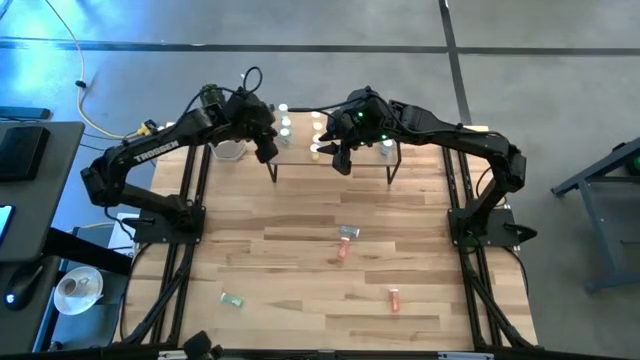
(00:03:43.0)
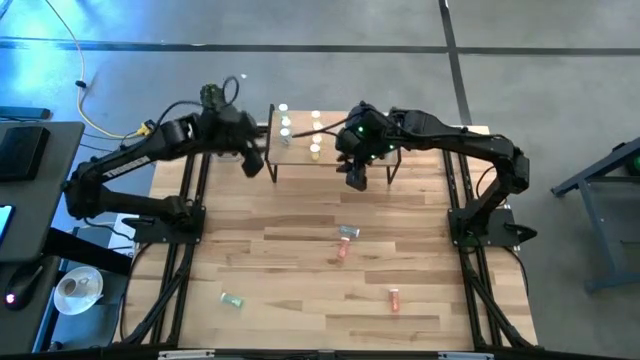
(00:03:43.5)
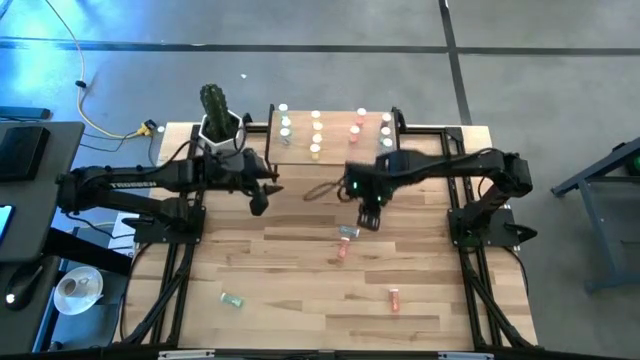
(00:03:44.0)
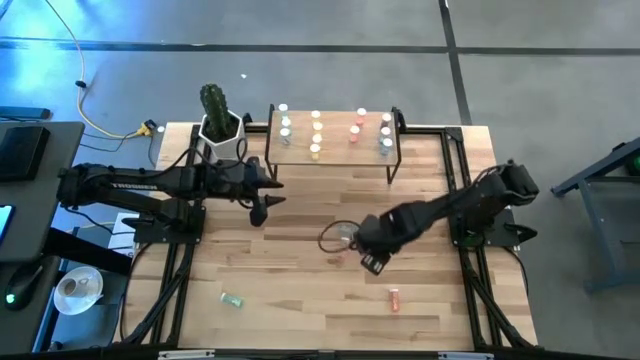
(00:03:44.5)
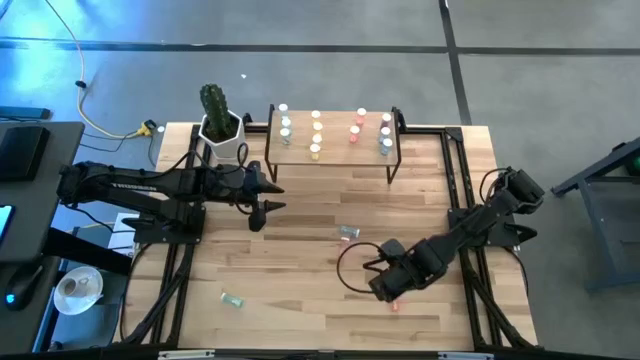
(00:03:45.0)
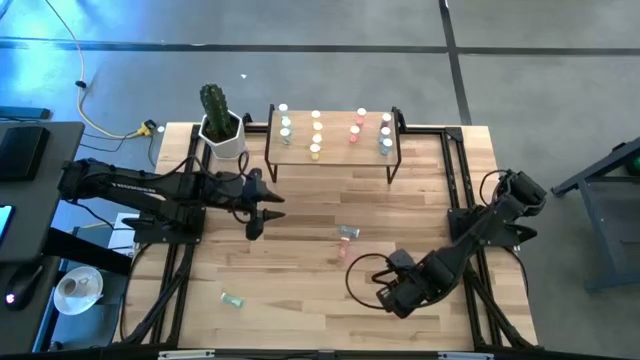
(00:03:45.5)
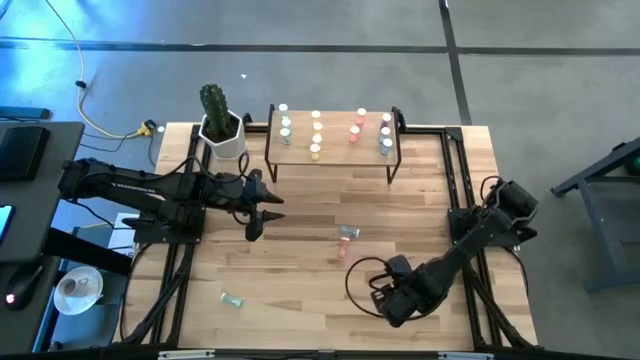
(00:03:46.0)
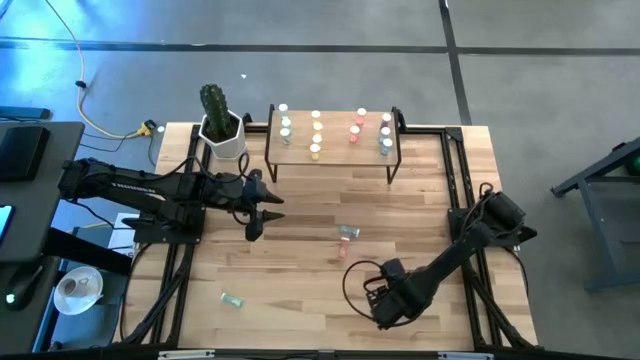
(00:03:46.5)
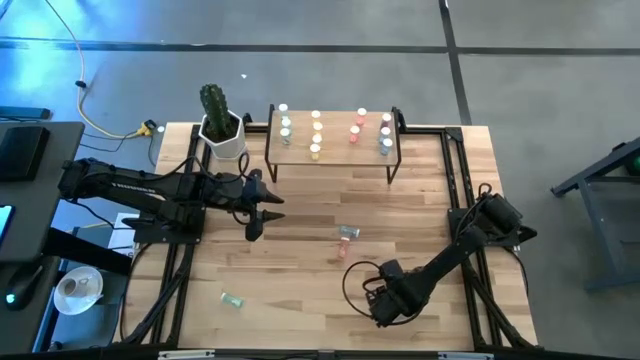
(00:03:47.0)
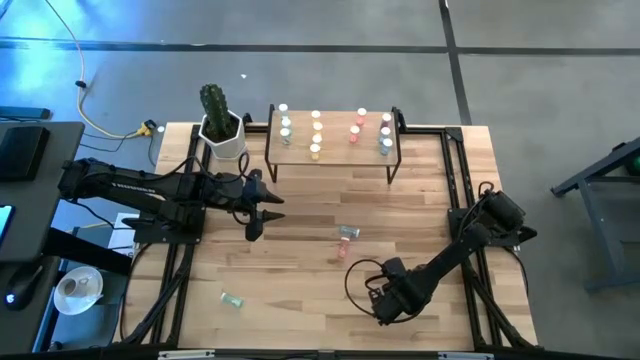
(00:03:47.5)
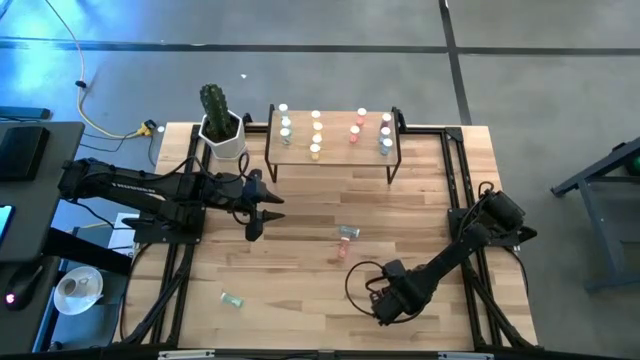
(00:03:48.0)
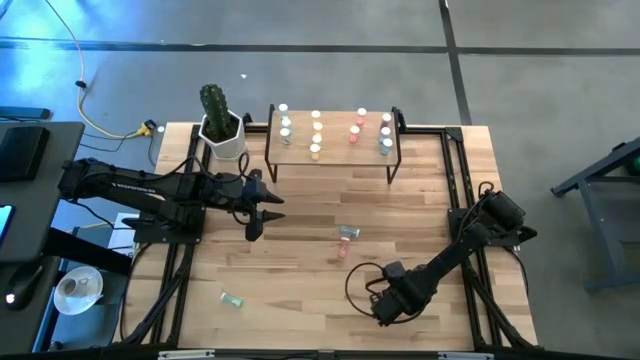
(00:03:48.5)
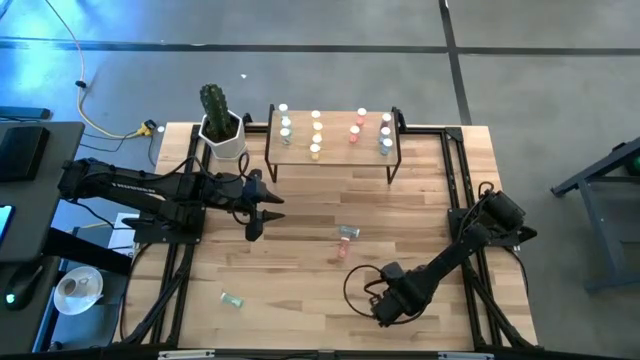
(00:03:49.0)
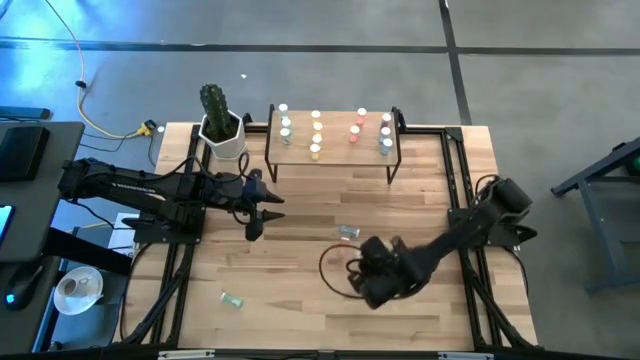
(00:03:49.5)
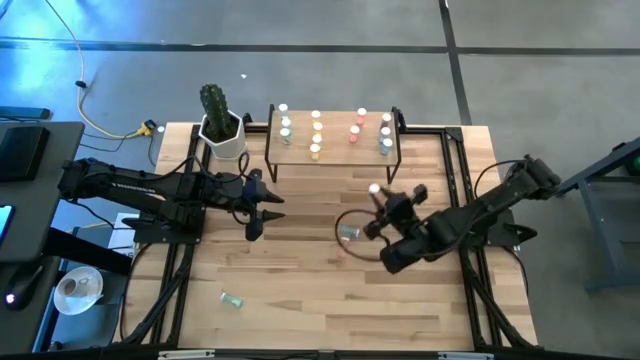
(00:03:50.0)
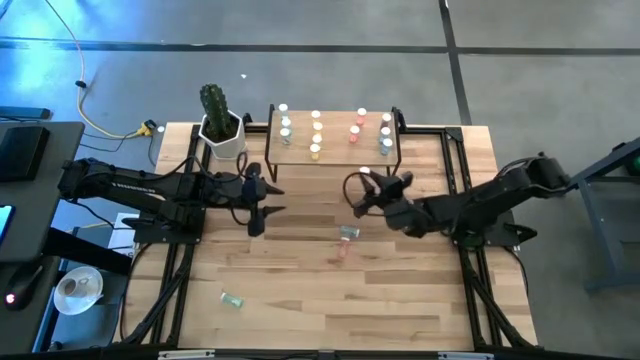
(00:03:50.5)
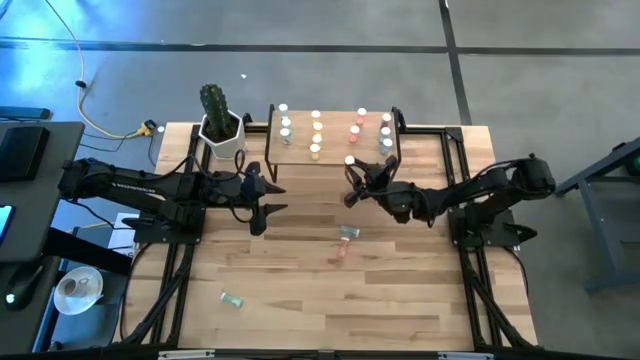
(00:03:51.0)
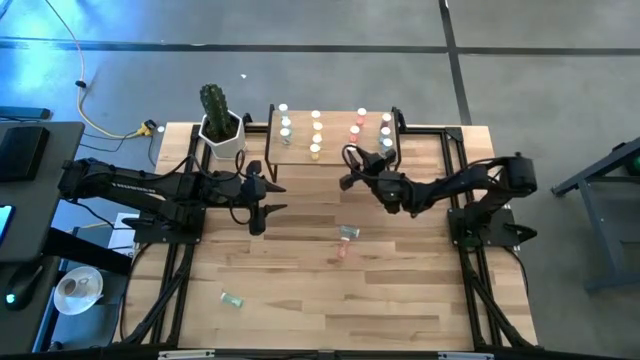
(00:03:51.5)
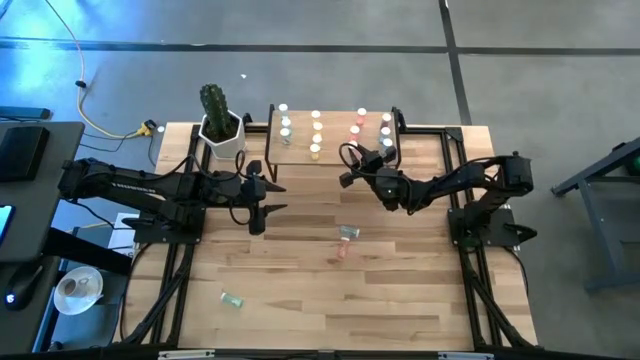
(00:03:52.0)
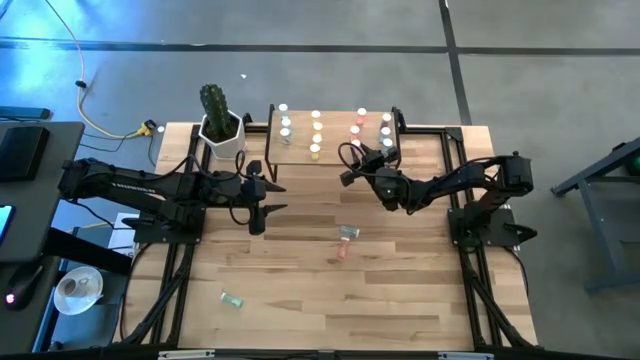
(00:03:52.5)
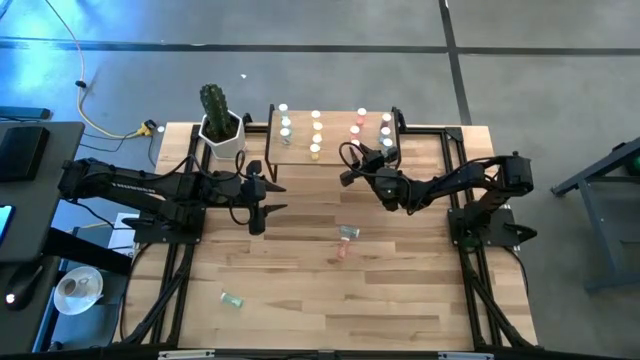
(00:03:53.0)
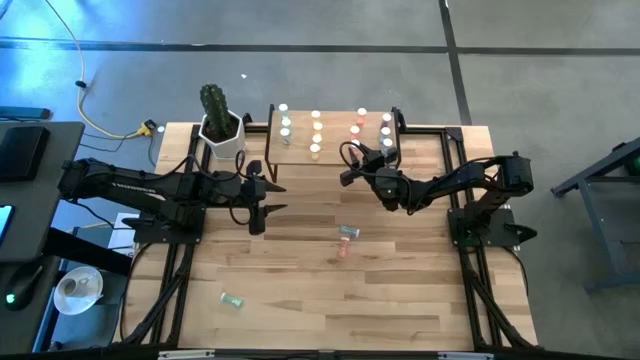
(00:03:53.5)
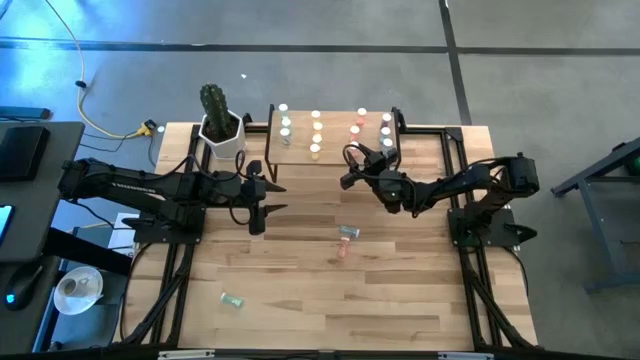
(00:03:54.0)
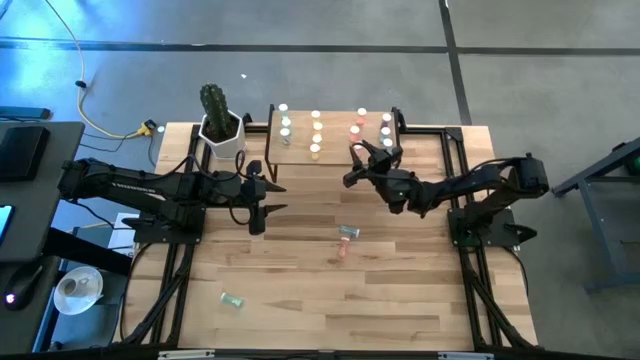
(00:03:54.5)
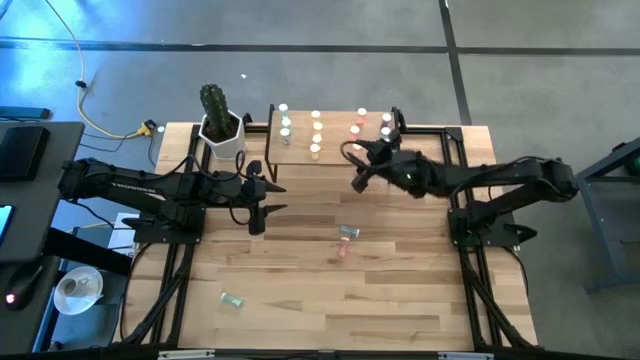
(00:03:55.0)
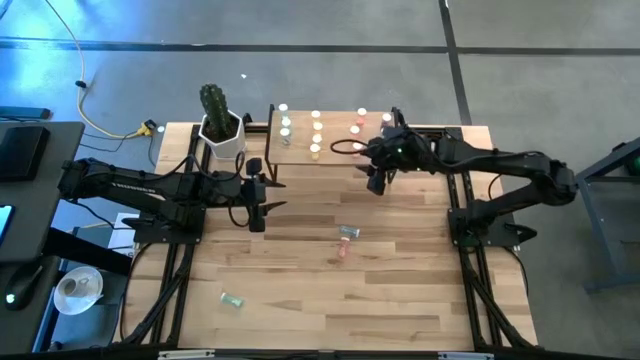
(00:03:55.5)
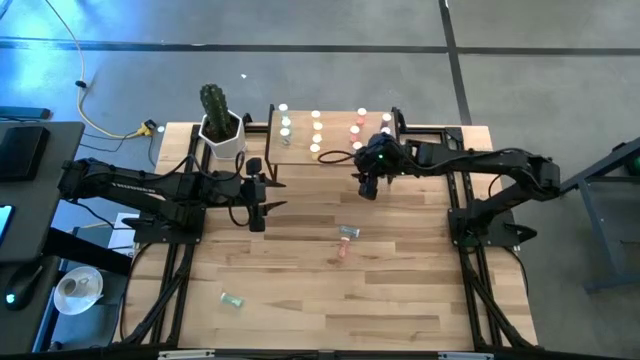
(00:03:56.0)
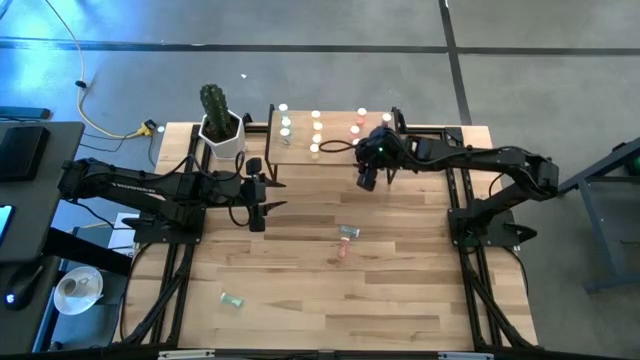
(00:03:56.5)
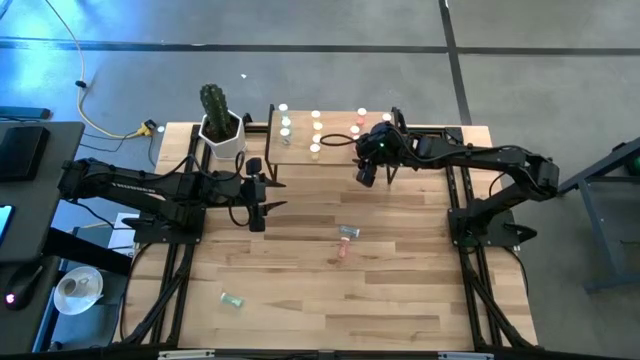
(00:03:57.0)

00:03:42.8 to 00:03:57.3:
Task: Pick and place medicine bottles onto shelf by color
Put the orange pill bottle on the shelf

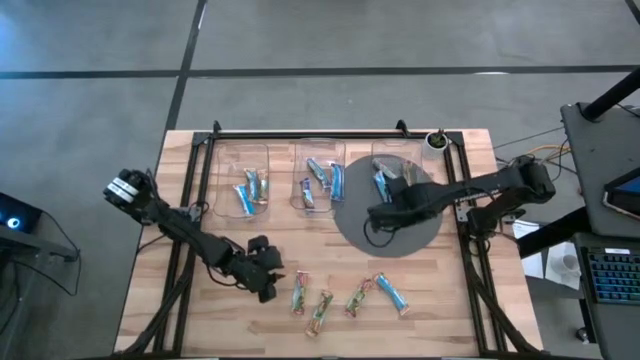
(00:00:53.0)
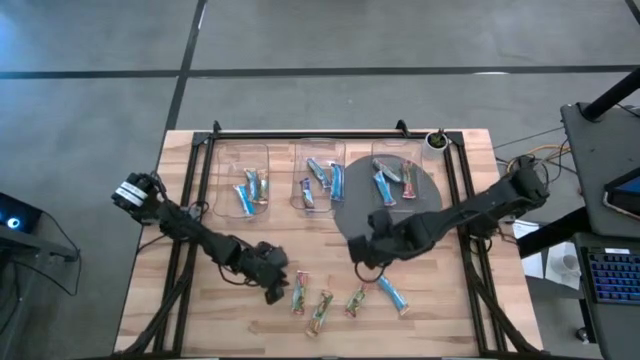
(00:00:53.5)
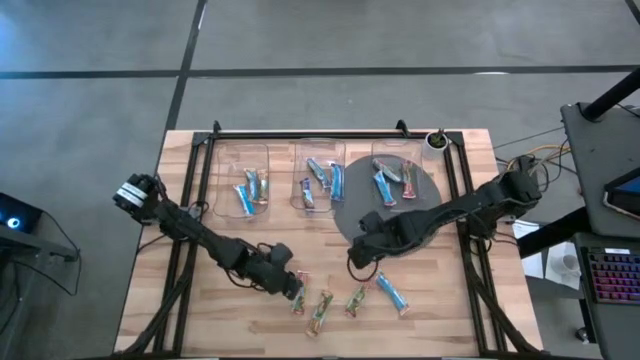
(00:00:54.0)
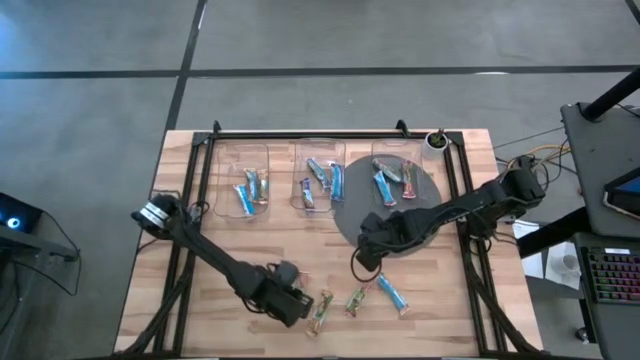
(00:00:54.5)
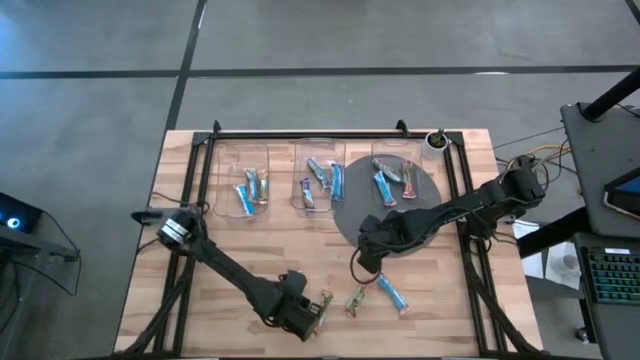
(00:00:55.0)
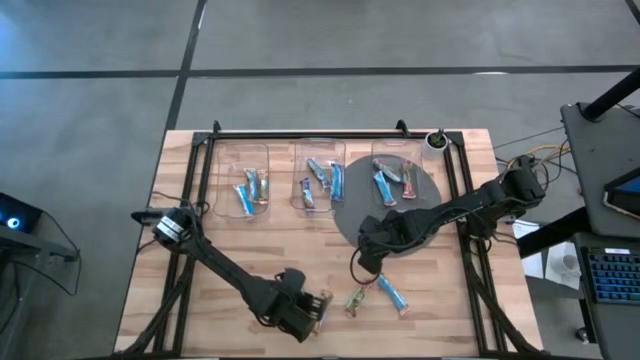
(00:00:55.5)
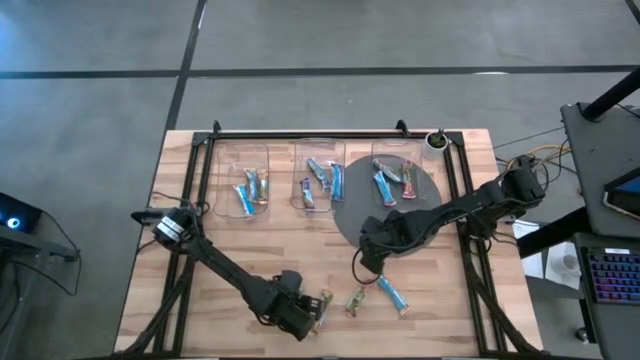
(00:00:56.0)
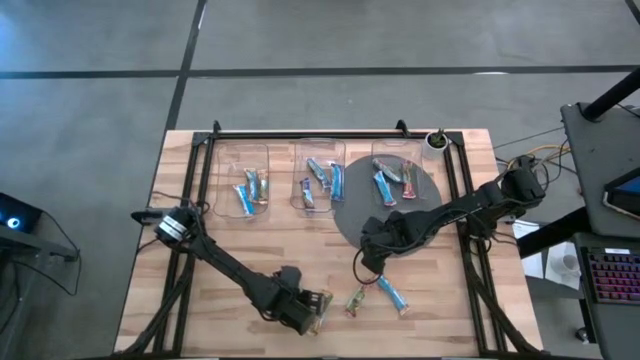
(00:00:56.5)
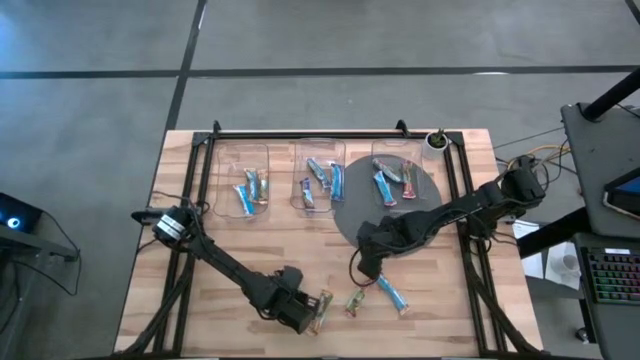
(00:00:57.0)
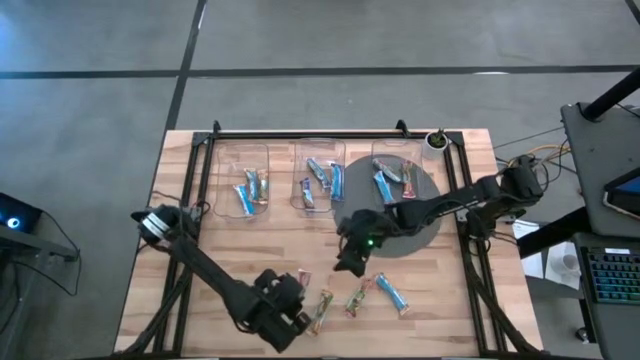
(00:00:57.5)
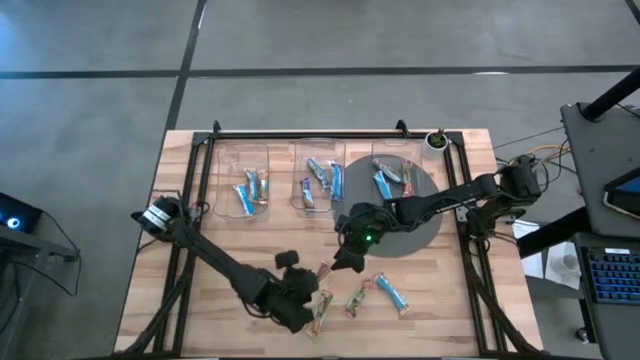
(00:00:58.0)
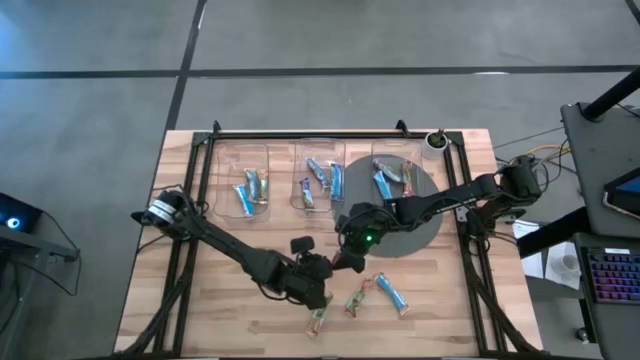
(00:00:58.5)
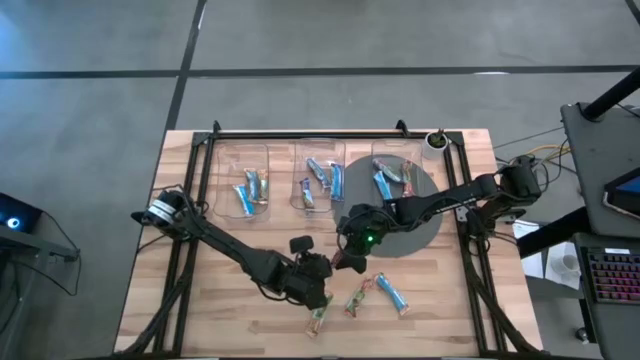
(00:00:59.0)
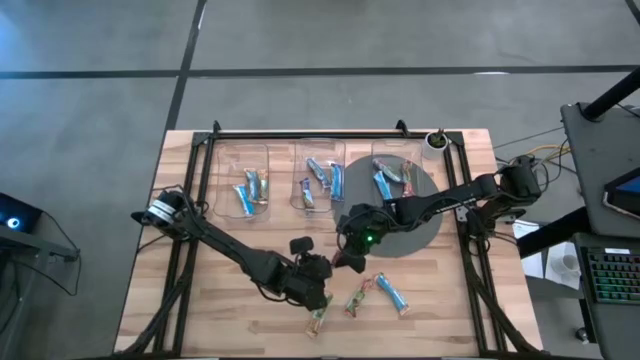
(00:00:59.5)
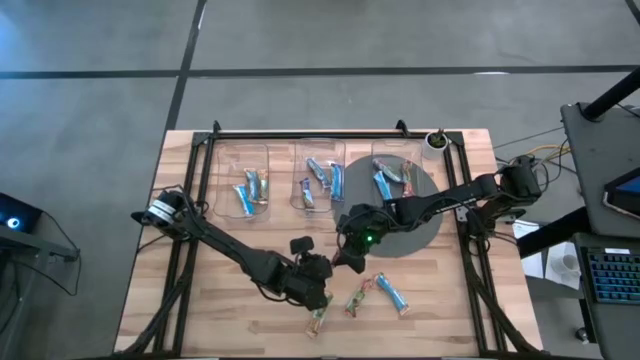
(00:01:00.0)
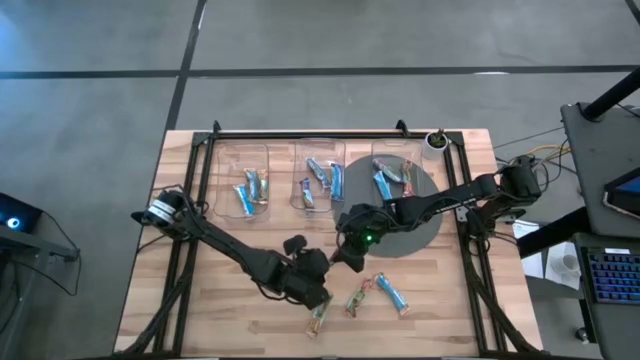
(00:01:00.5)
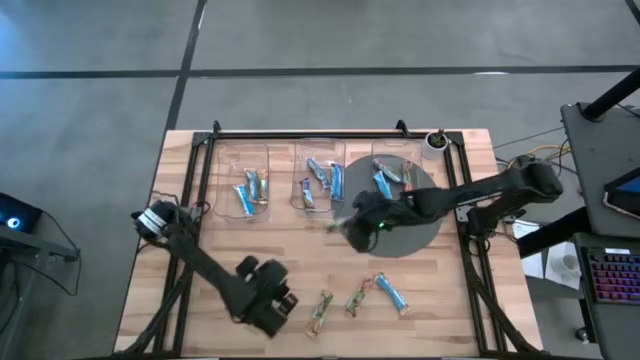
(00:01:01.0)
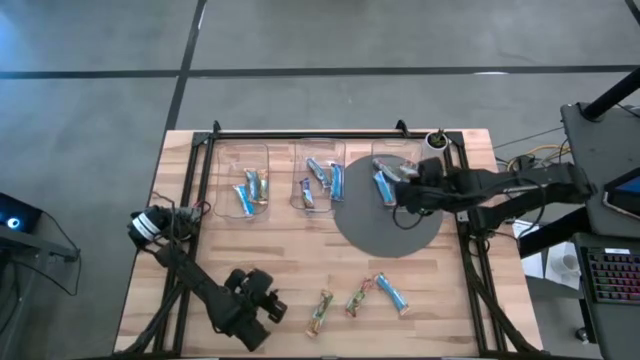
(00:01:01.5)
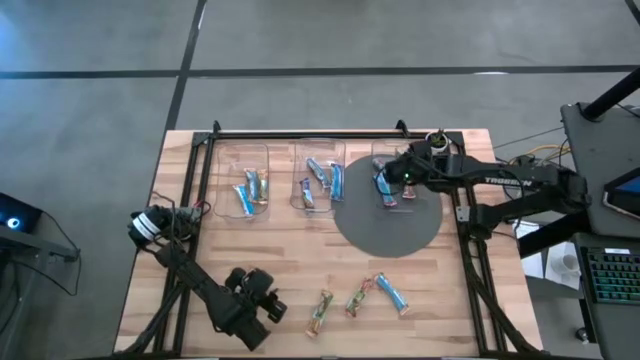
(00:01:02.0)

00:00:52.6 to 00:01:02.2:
Task: Pick and place Granola Bars by type
Put the red granola bar into the right transparent container
